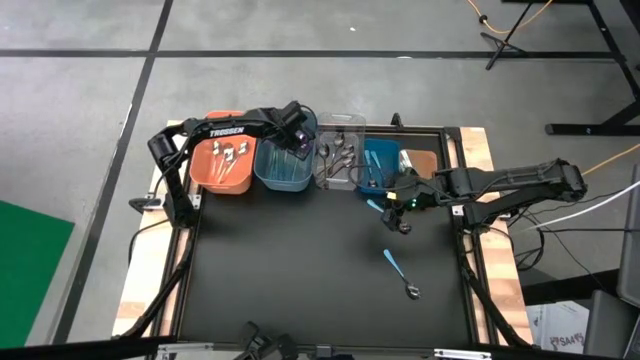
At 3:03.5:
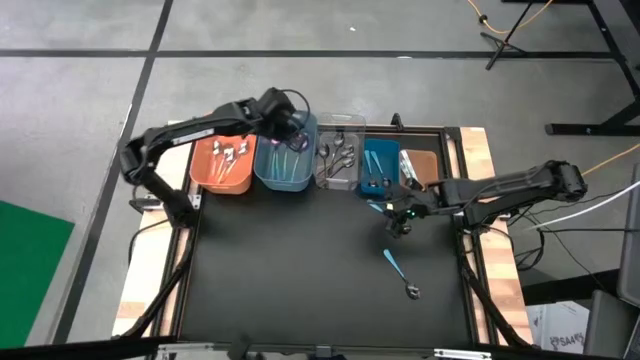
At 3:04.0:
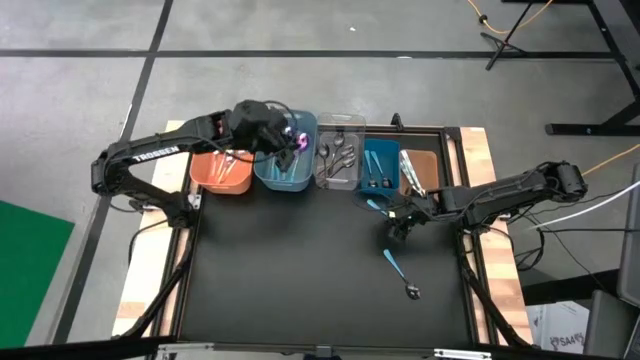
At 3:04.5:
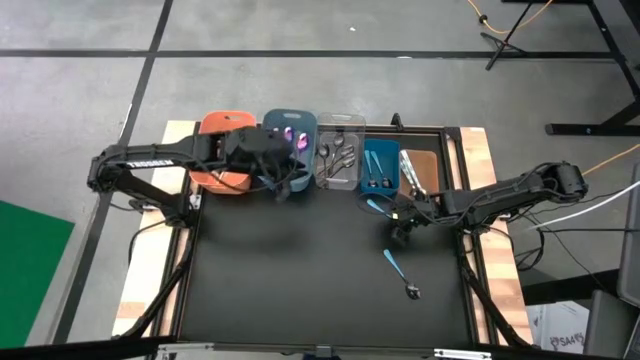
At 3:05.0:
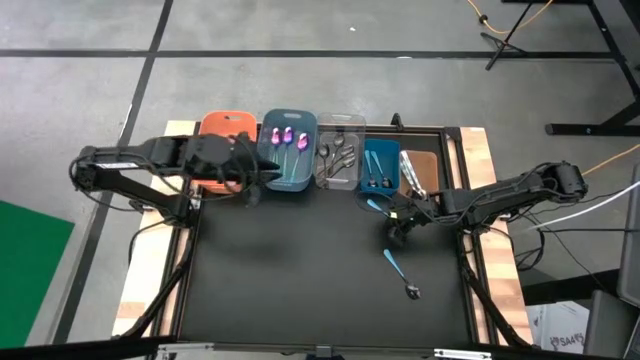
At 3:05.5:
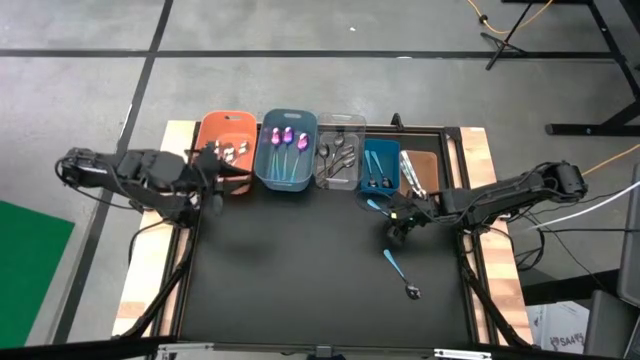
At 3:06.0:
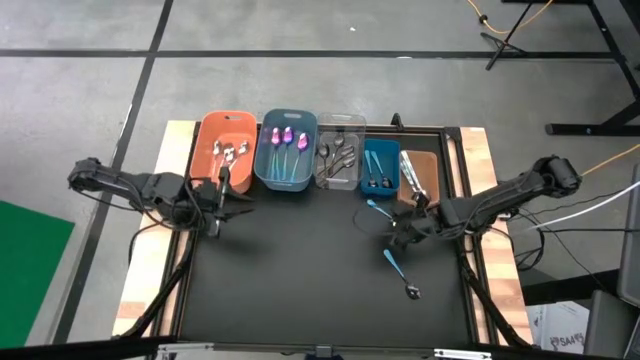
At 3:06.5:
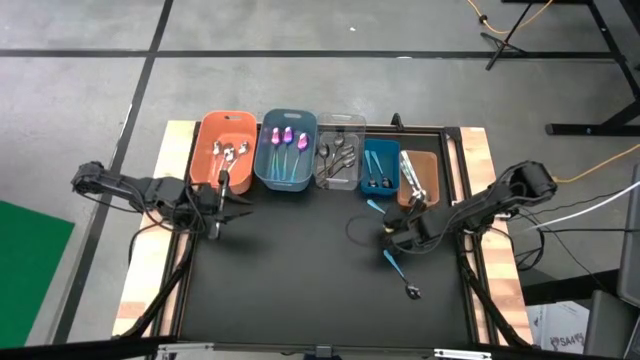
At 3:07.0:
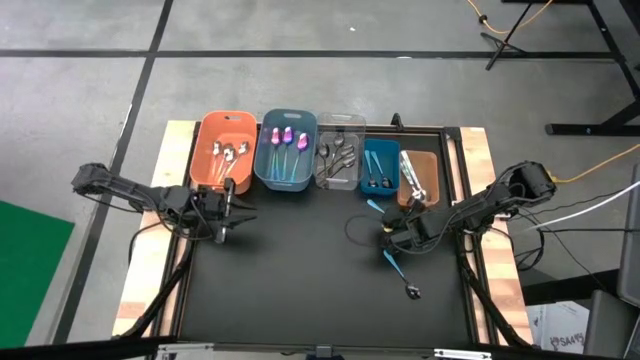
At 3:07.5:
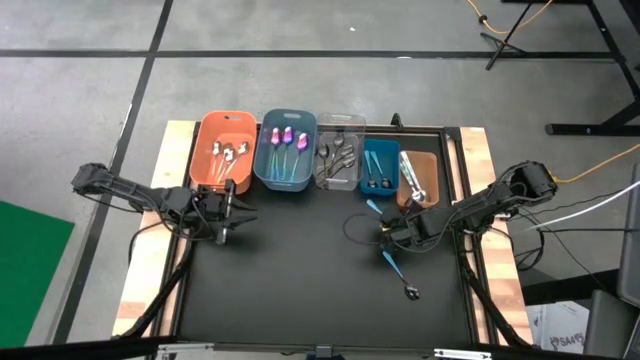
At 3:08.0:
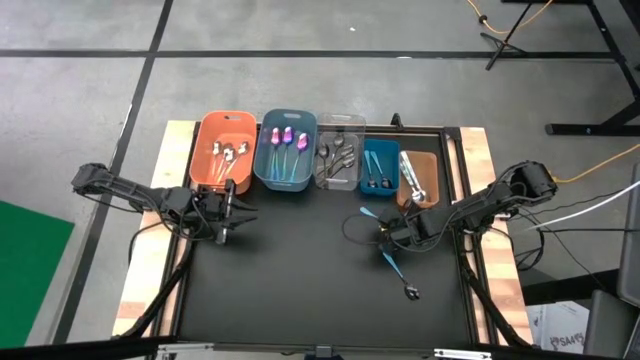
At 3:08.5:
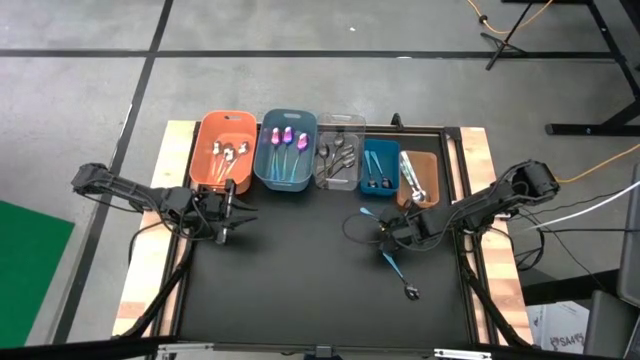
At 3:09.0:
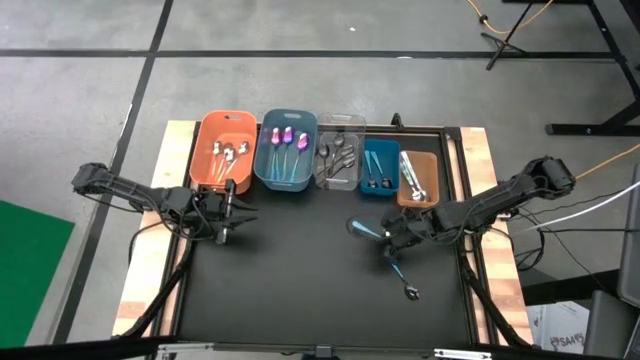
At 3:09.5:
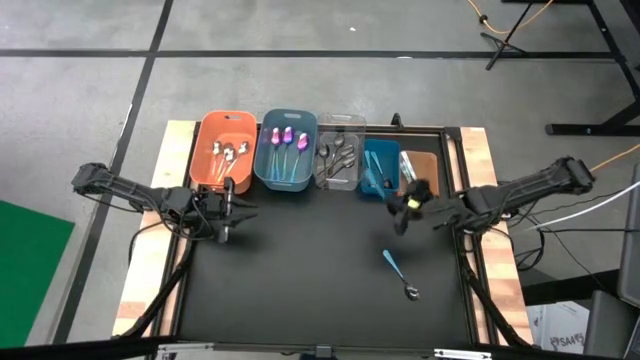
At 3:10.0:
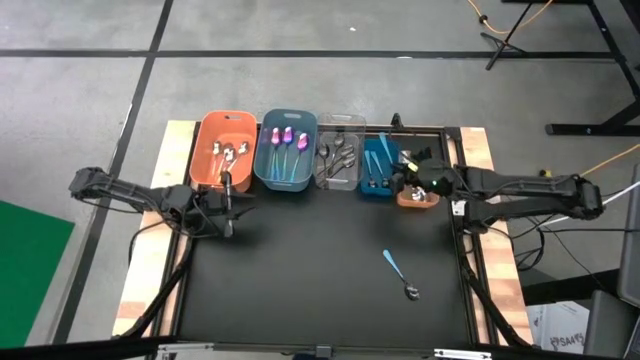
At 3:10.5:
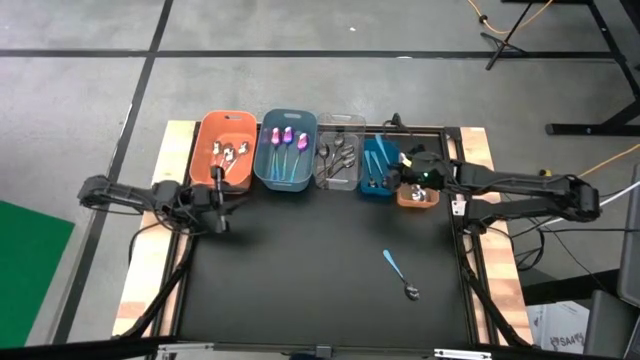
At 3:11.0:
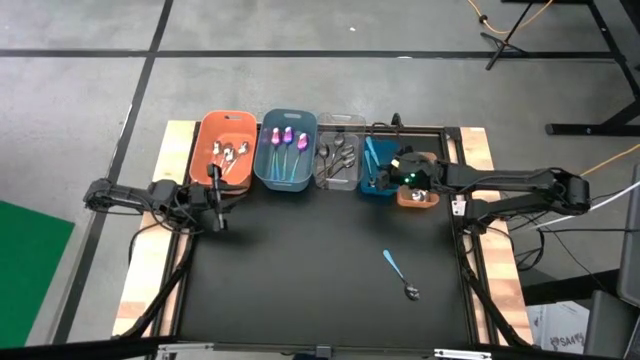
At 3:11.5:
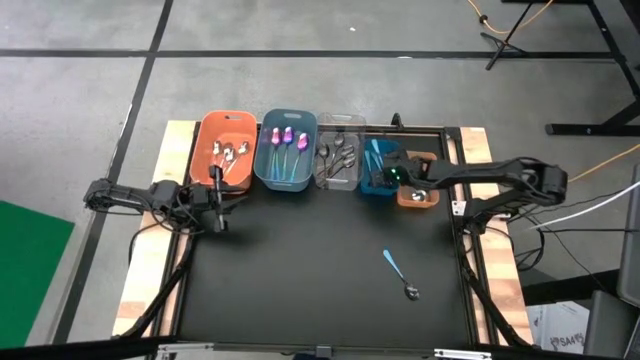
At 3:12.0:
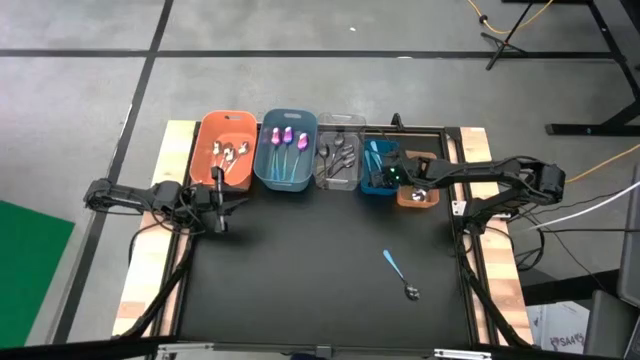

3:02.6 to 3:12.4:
Task: Sort silverware by color (type)
Put the light blue spoon into the right blue bin

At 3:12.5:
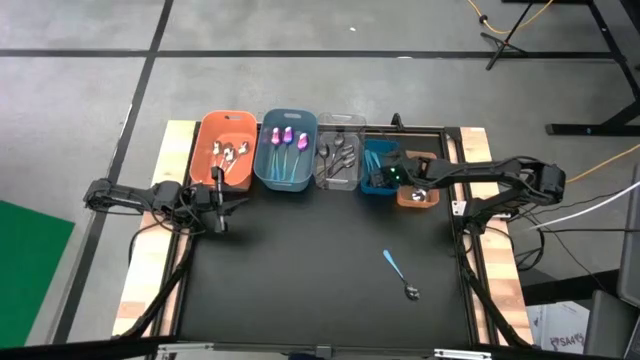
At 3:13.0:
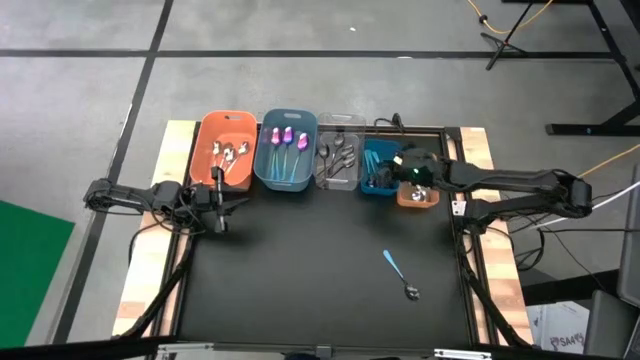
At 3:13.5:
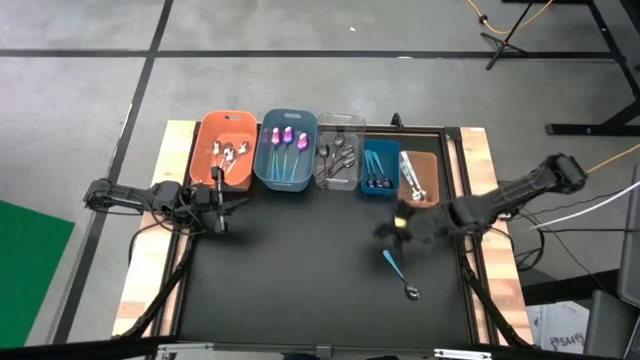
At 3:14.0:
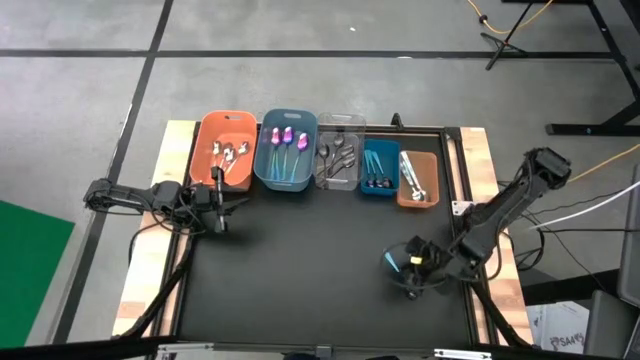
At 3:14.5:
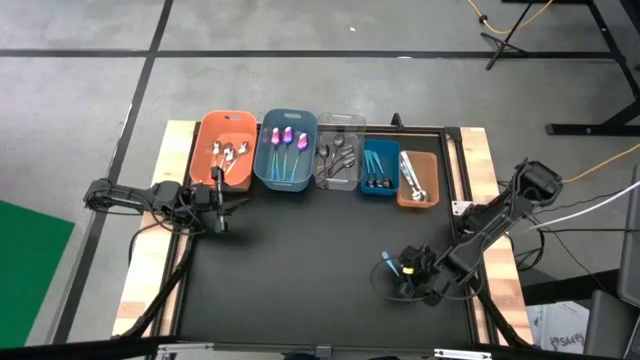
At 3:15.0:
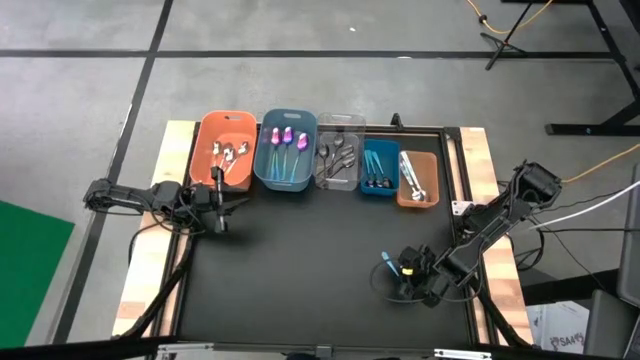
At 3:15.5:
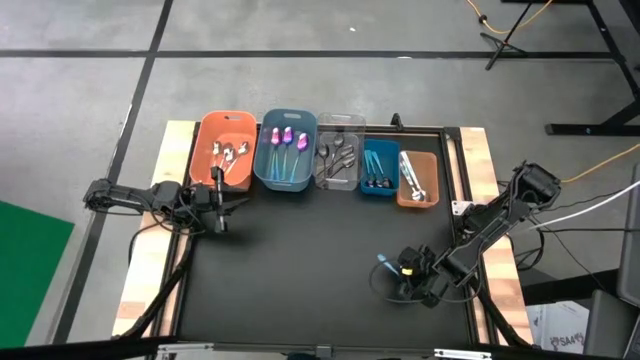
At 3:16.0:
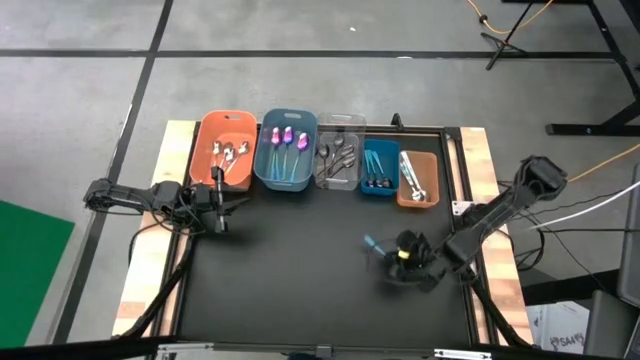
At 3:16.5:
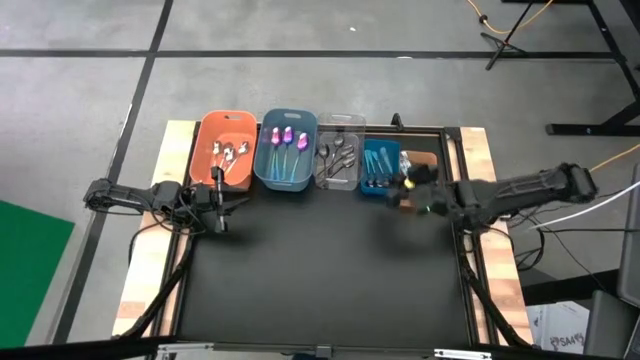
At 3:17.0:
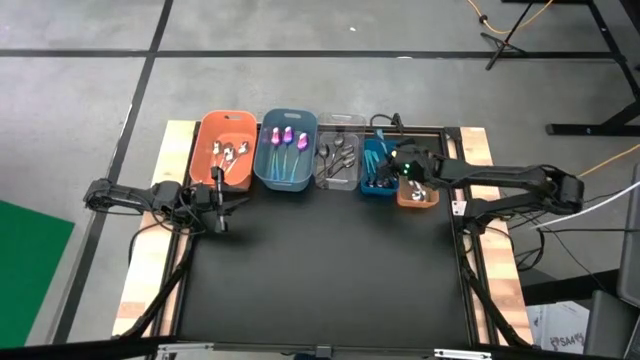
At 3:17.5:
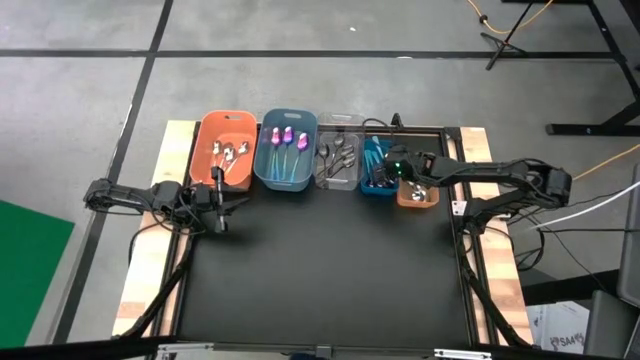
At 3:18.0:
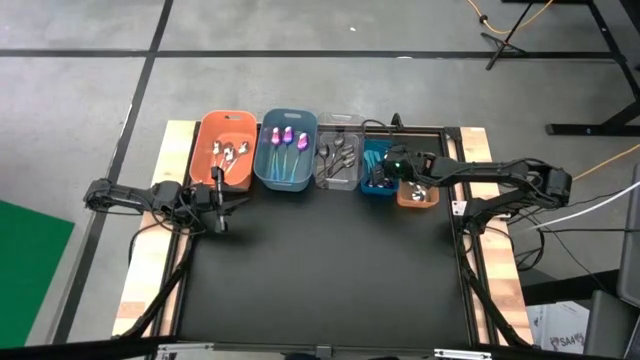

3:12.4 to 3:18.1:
Put the light blue spoon into the right blue bin

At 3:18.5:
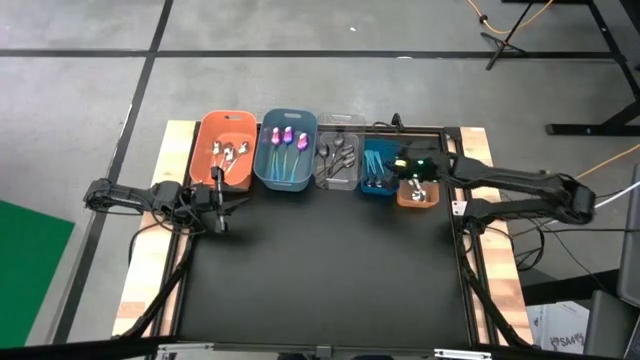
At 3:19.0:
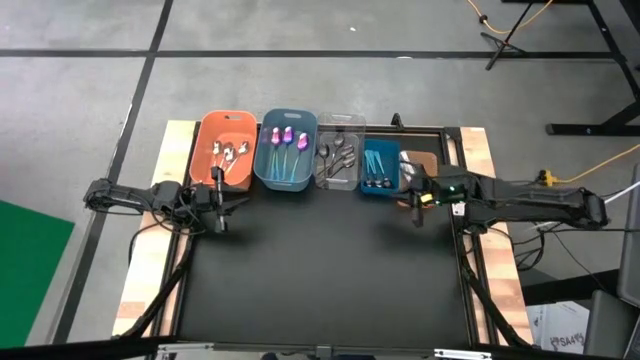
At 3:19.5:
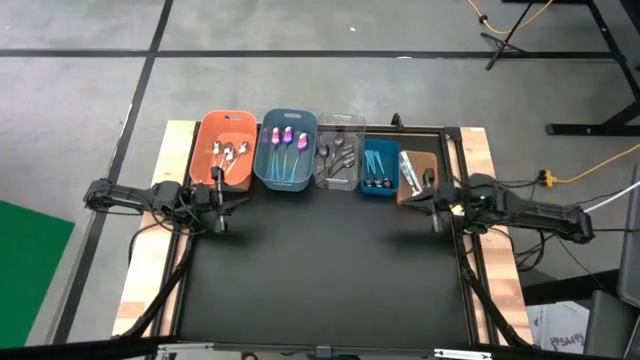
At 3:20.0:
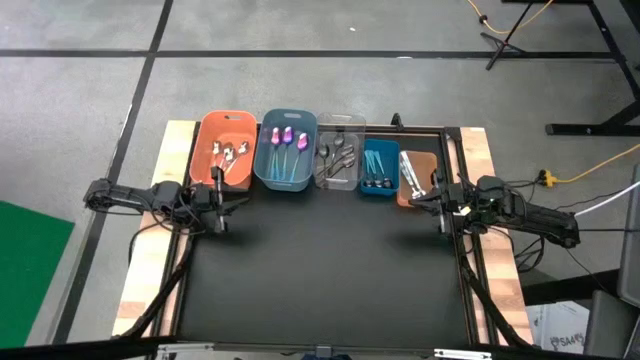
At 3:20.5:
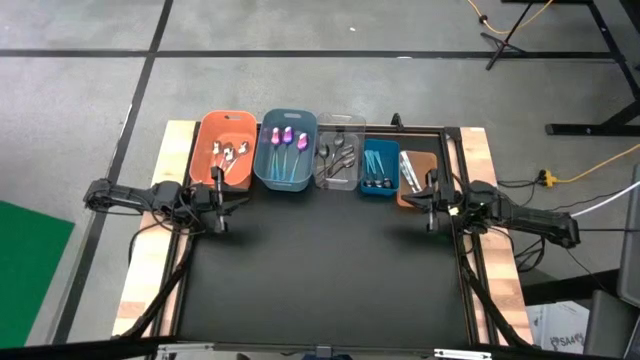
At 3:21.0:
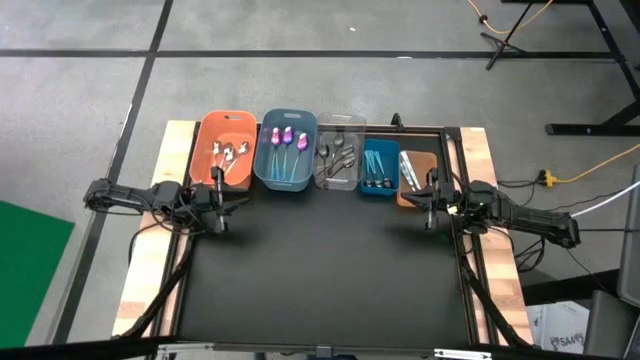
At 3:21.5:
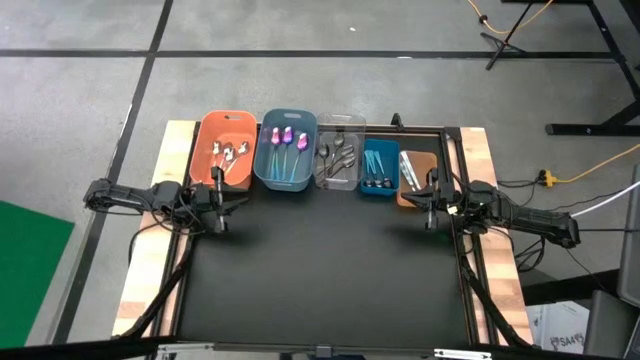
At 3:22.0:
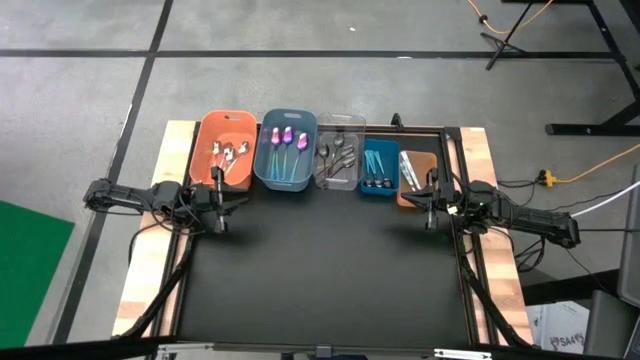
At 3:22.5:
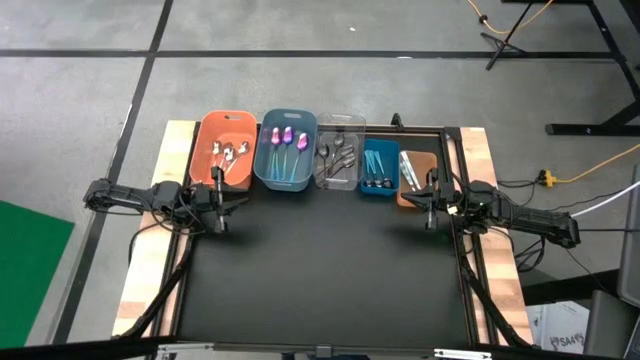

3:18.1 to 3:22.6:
Return to Home Position

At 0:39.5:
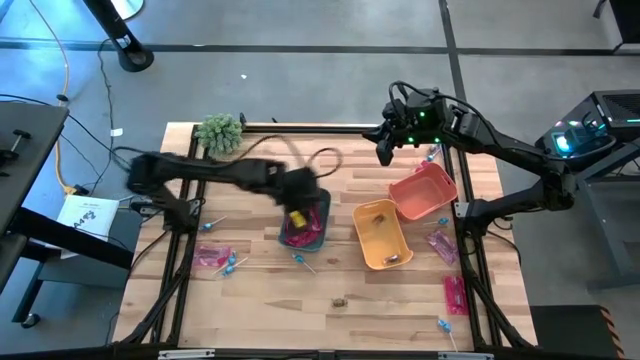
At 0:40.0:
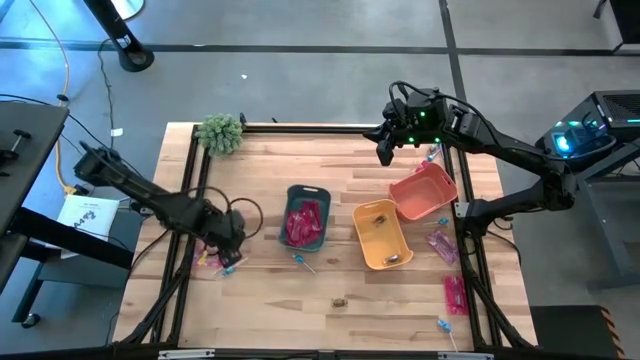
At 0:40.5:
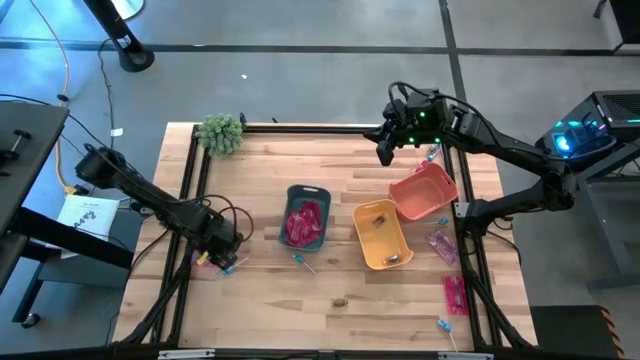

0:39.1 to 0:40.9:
Task: Sort candy
Put the red candy pack into the blue bin

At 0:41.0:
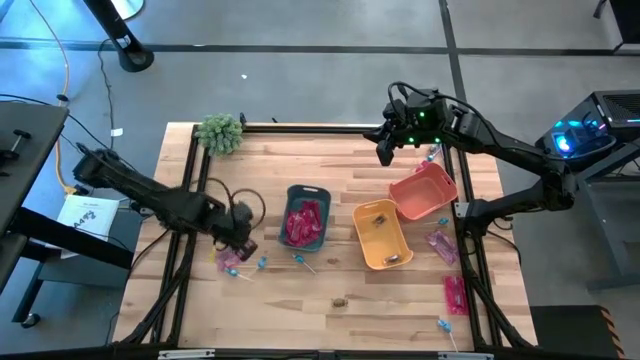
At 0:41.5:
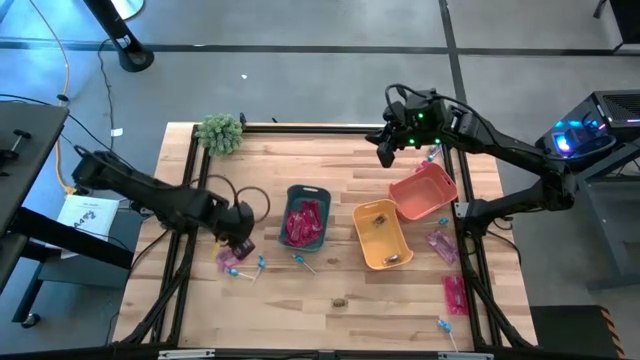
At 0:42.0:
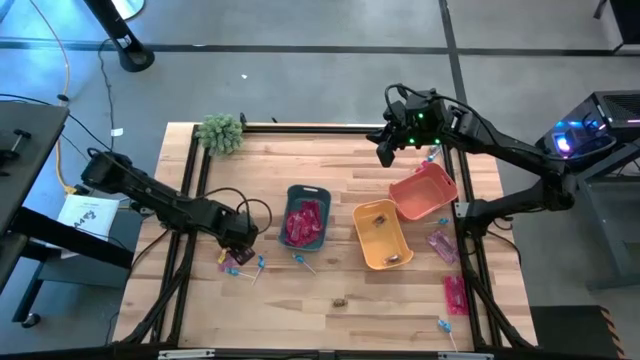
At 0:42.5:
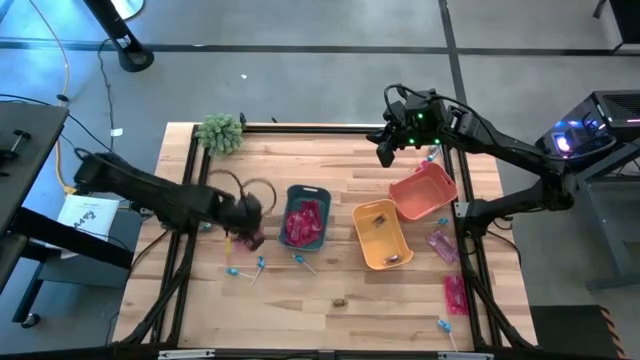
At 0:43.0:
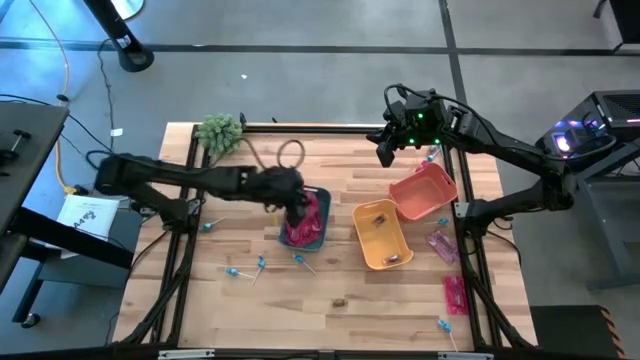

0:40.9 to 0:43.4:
Put the red candy pack into the blue bin
